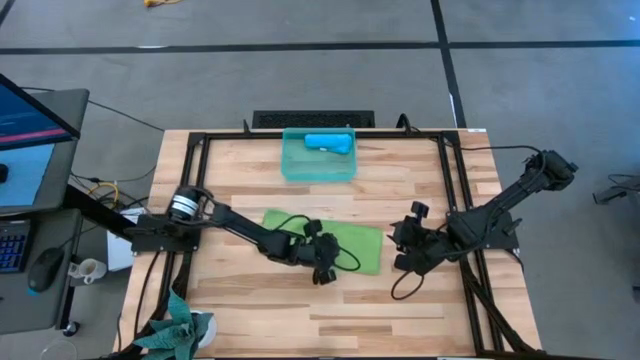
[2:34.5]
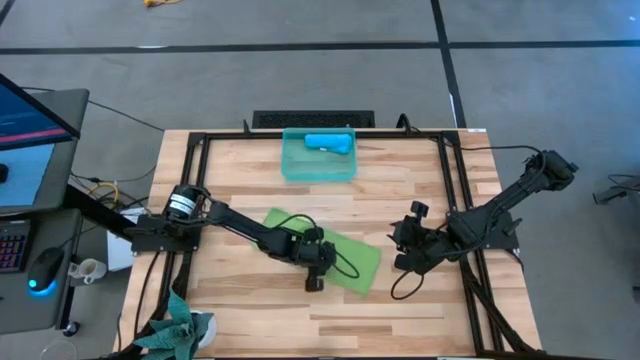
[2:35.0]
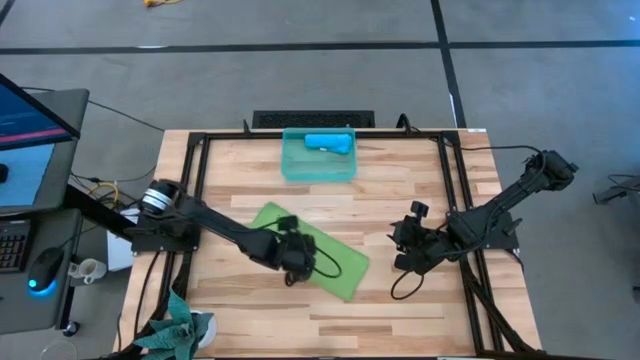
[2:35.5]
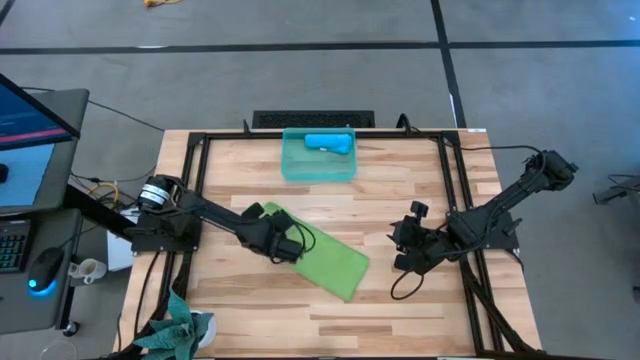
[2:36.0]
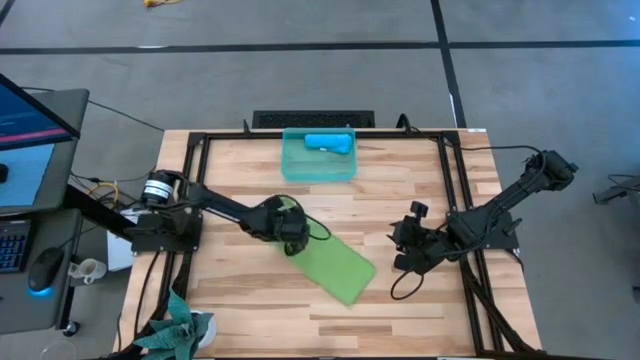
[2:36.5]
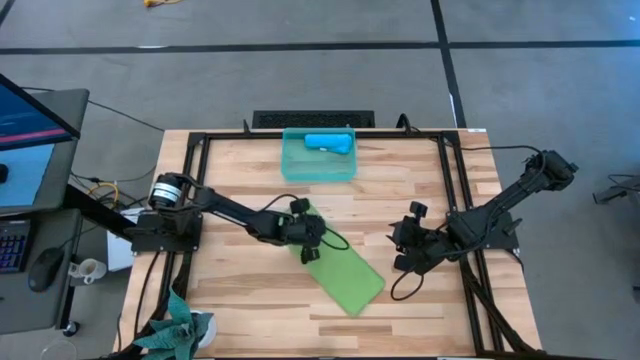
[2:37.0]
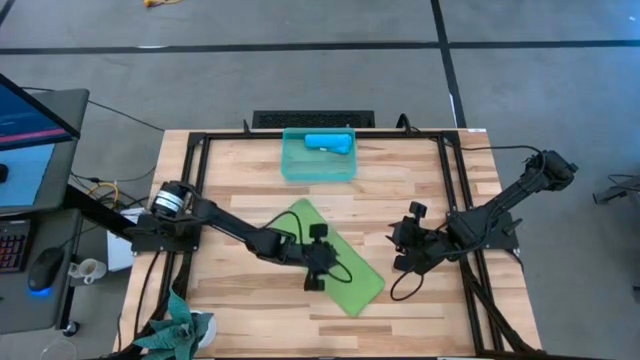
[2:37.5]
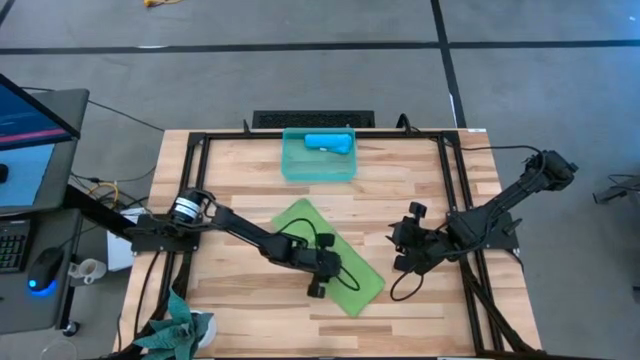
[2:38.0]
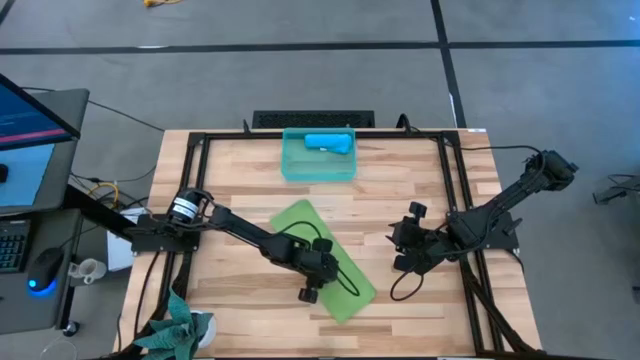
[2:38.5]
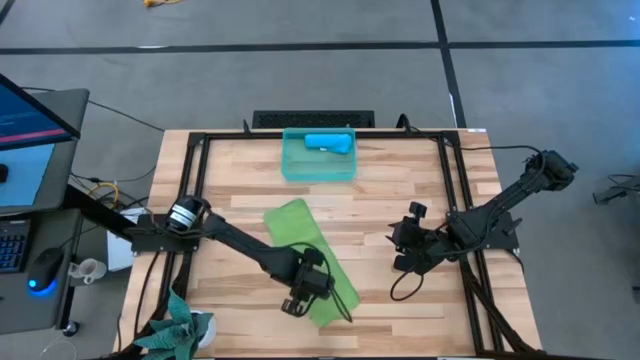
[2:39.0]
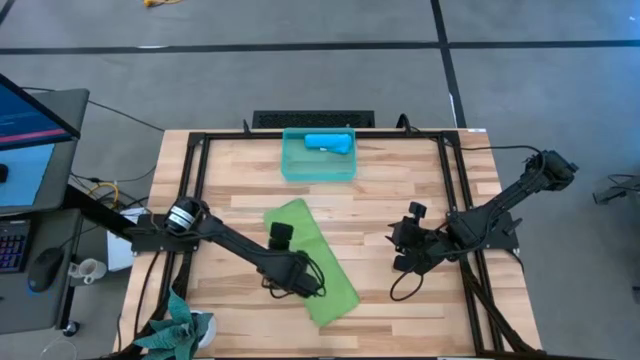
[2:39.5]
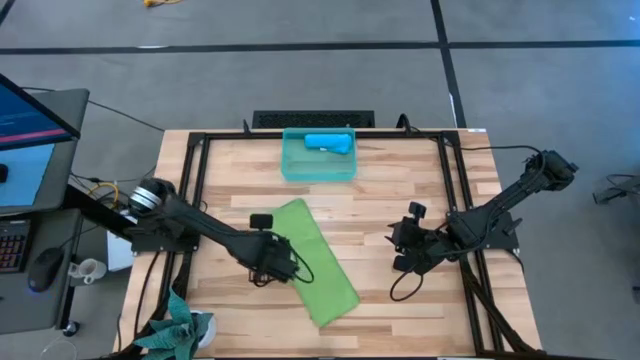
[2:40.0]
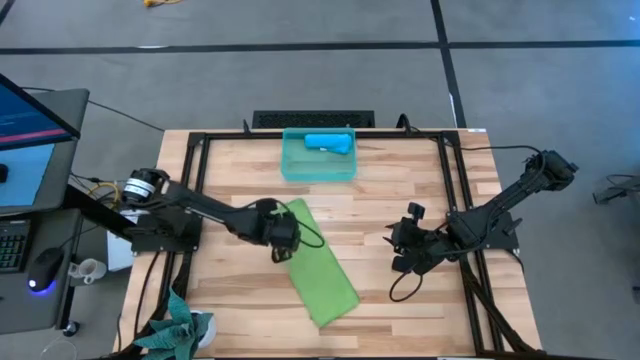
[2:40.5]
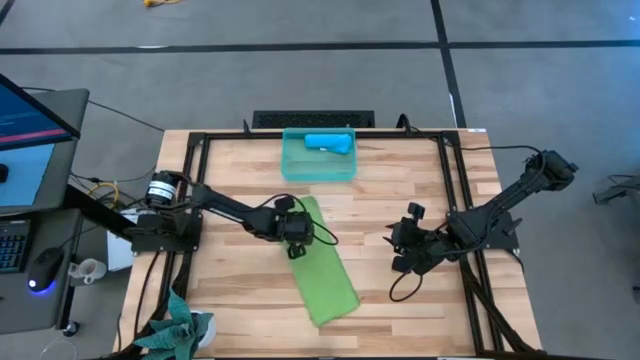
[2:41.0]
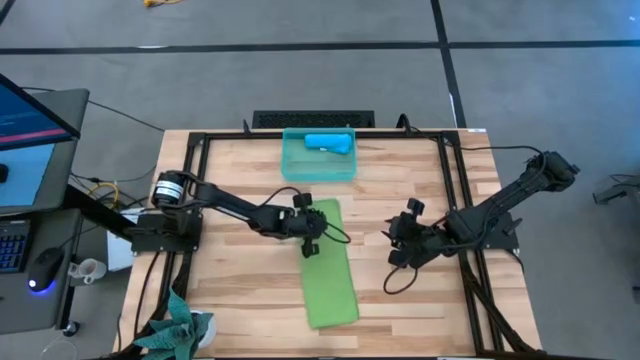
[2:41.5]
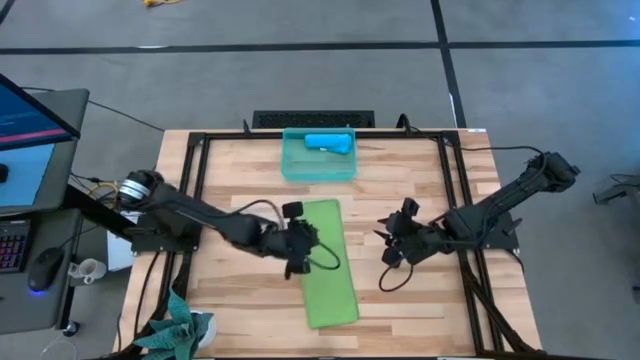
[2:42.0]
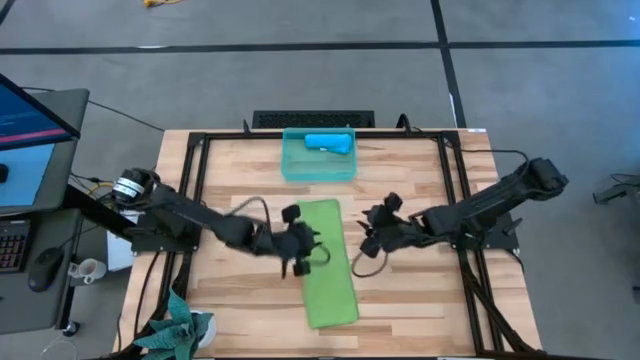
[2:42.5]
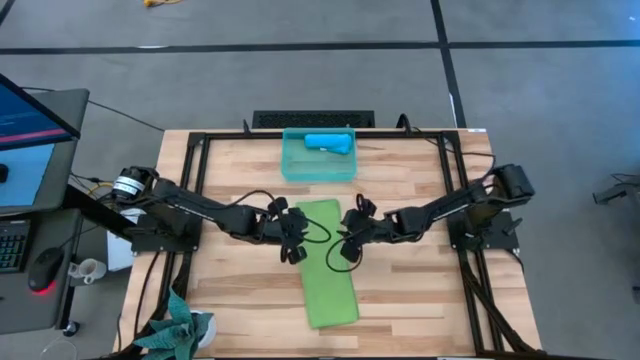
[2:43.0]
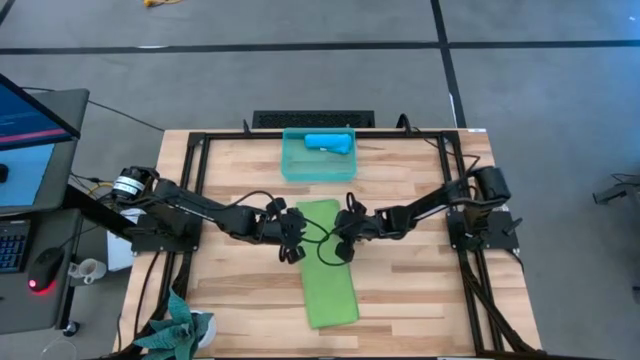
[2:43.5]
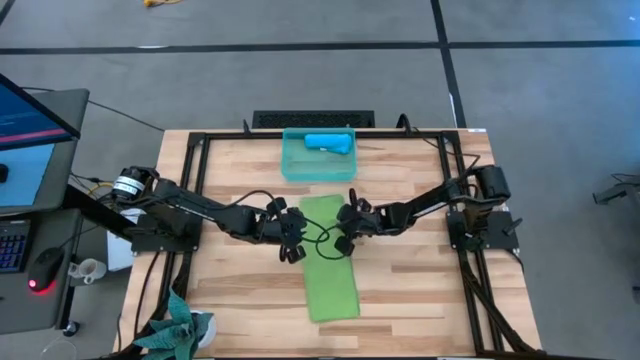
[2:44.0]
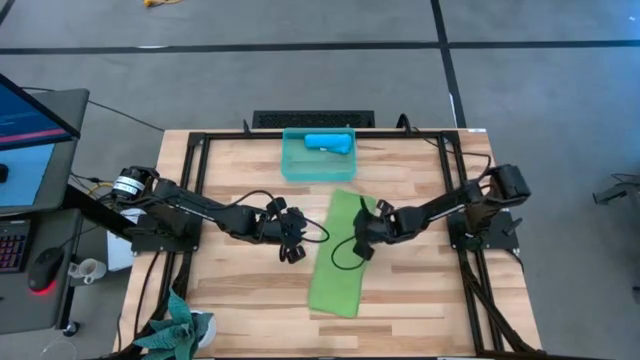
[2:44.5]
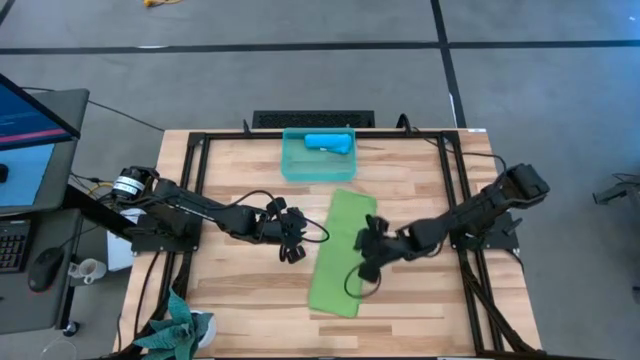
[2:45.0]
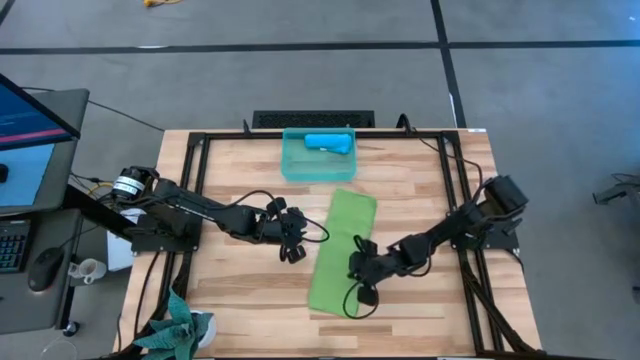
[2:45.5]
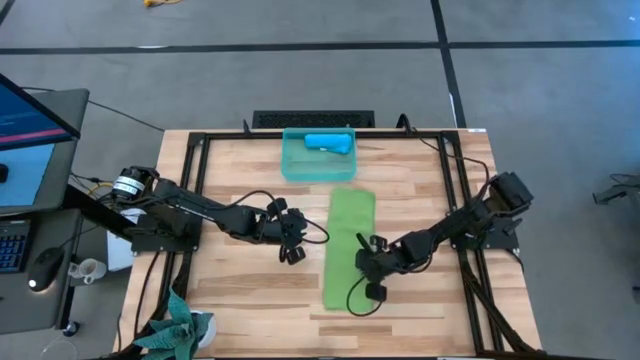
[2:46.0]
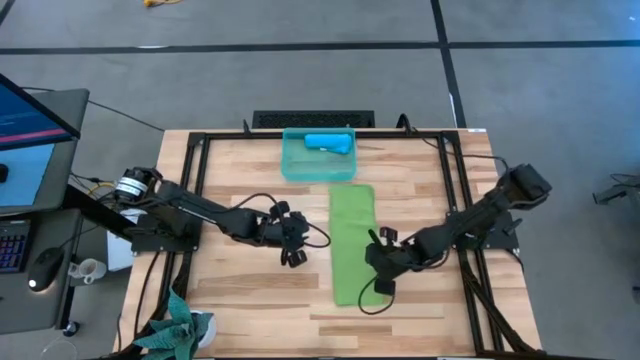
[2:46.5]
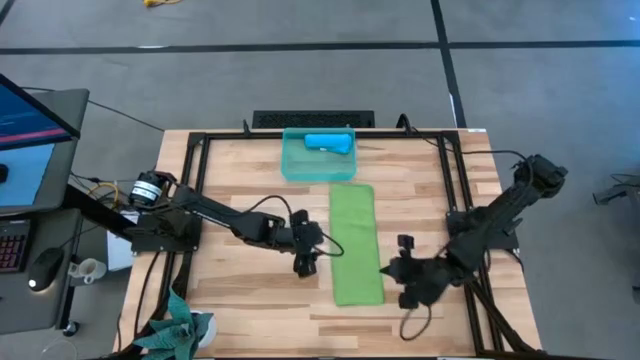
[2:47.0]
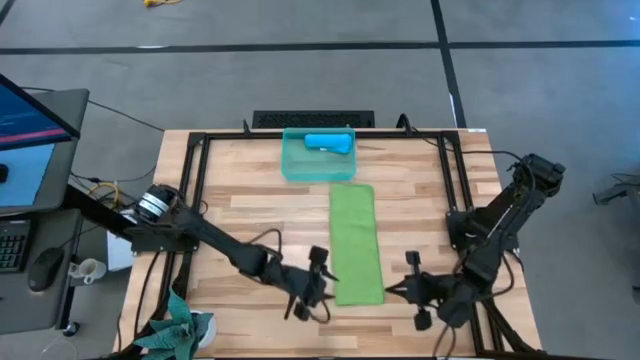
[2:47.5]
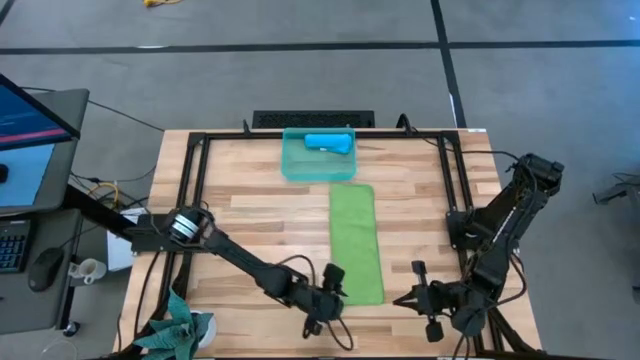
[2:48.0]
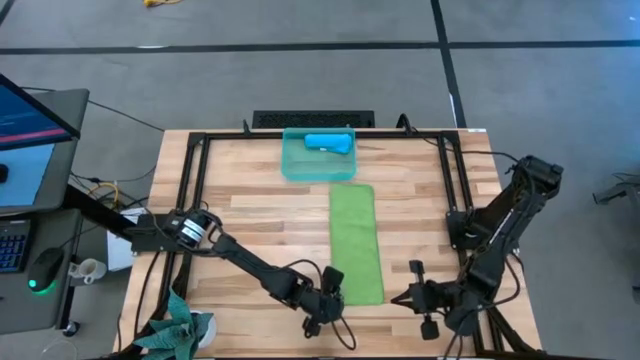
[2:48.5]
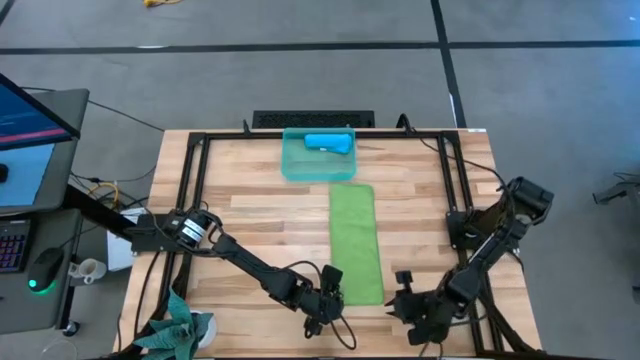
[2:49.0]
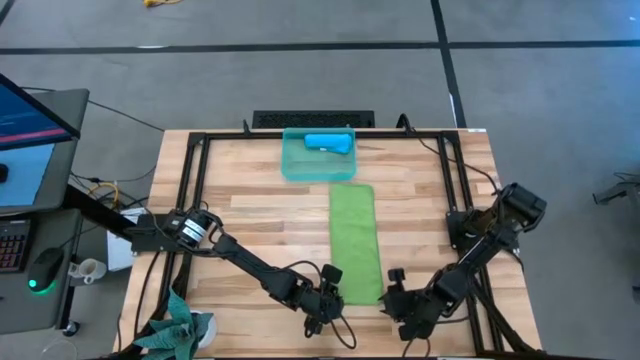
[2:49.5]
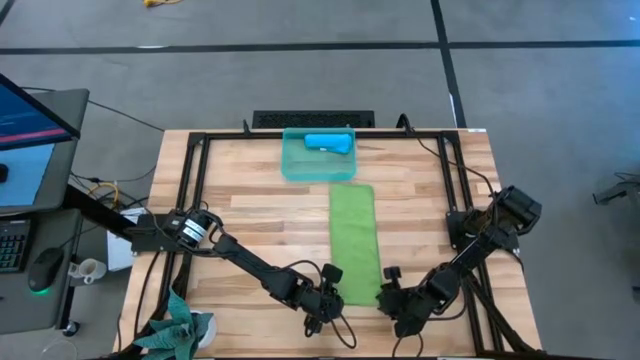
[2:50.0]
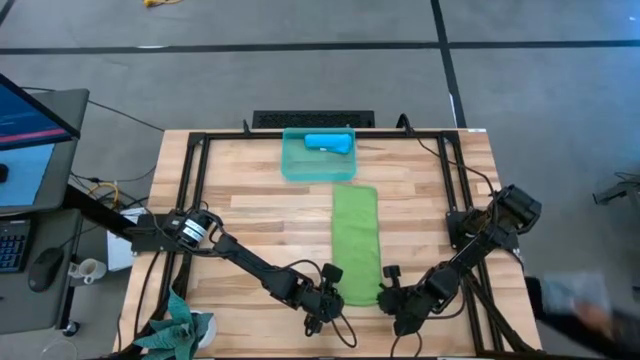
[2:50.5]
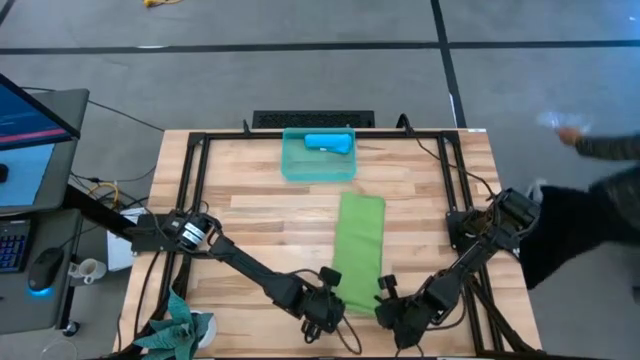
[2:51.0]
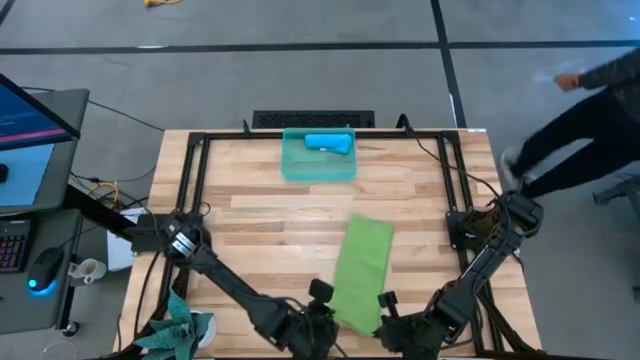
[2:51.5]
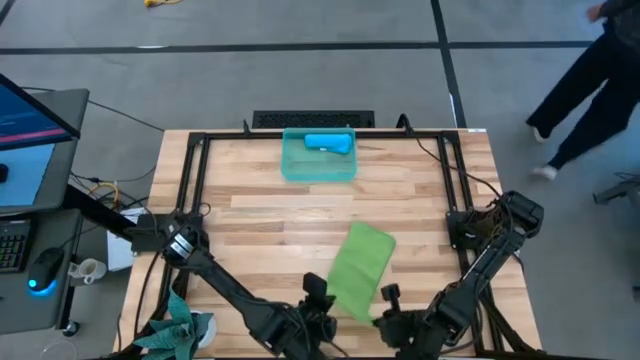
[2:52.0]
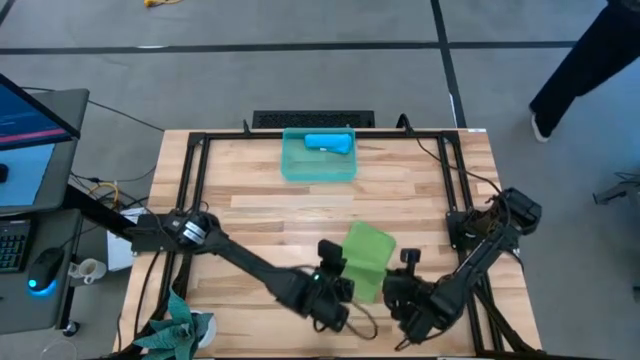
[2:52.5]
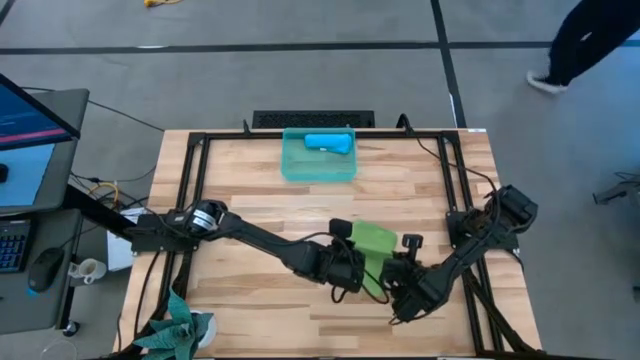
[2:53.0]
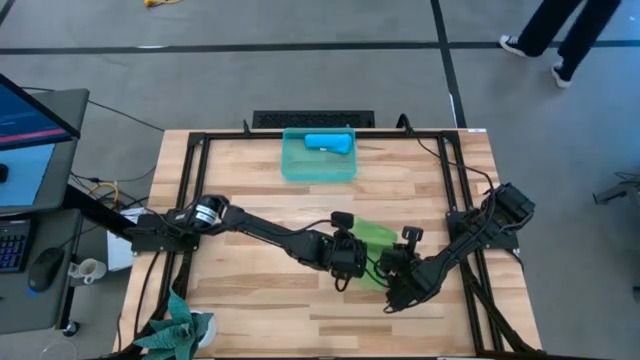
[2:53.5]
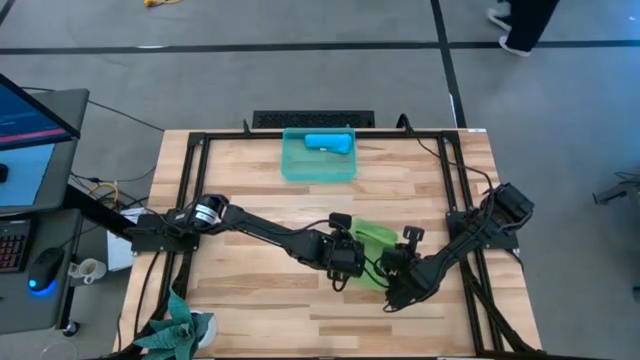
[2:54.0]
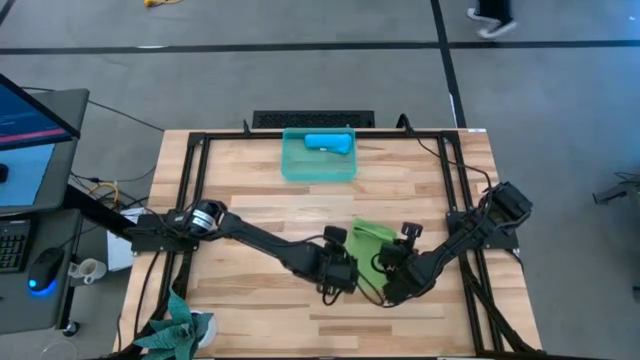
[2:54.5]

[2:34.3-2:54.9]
Task: Roll microfiber towels into tight, uniform cylinder then place into a basket
Fold the green microfiber cloth
